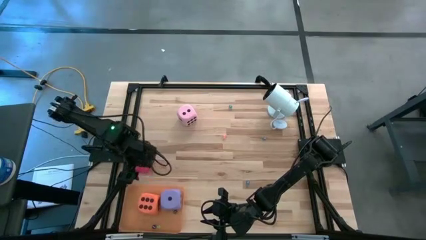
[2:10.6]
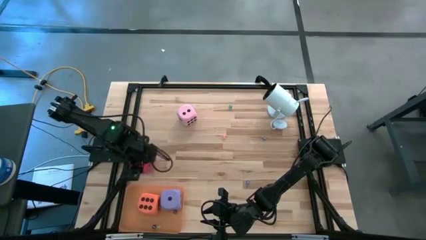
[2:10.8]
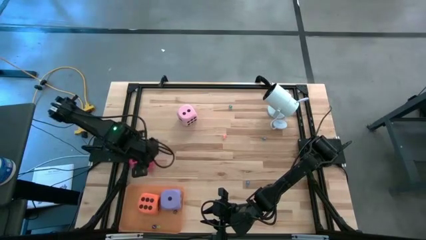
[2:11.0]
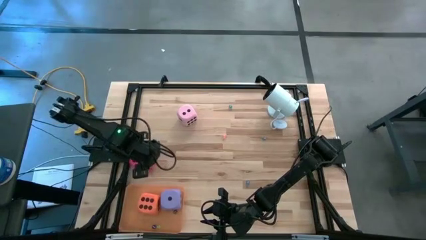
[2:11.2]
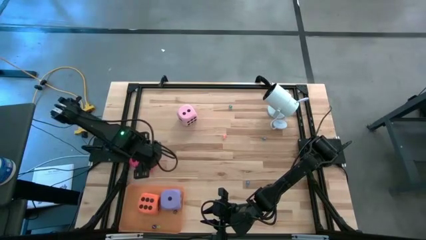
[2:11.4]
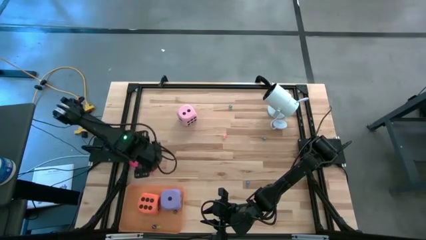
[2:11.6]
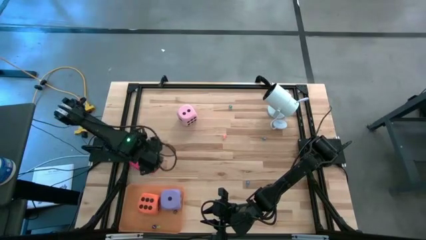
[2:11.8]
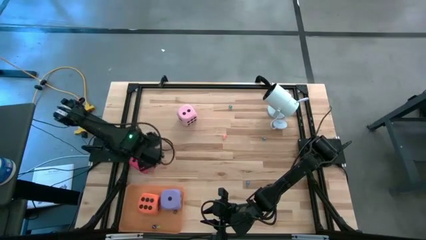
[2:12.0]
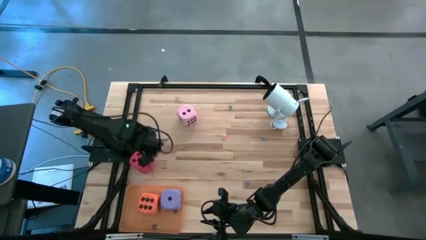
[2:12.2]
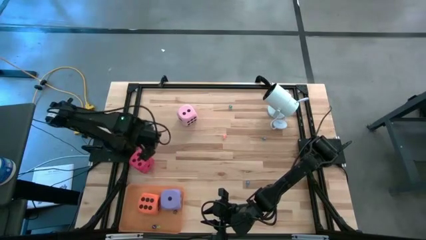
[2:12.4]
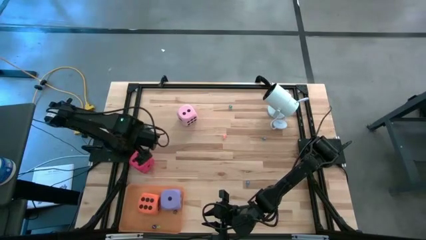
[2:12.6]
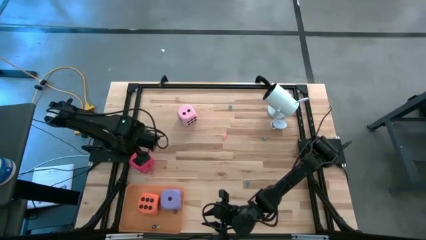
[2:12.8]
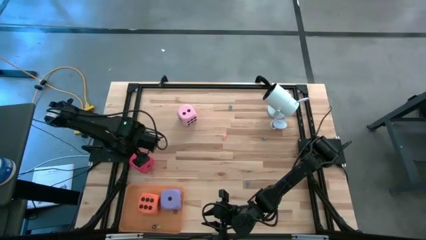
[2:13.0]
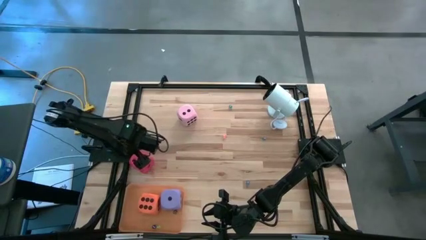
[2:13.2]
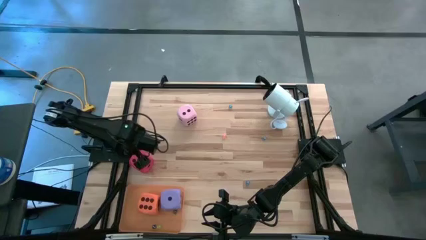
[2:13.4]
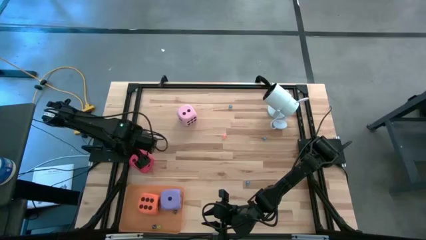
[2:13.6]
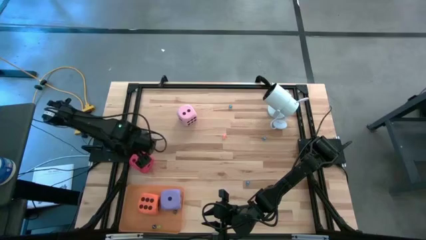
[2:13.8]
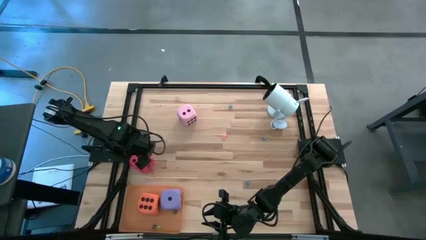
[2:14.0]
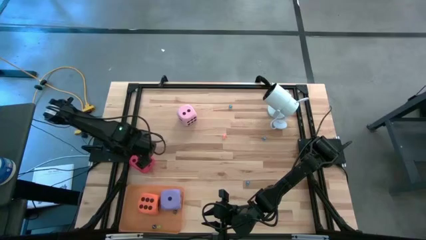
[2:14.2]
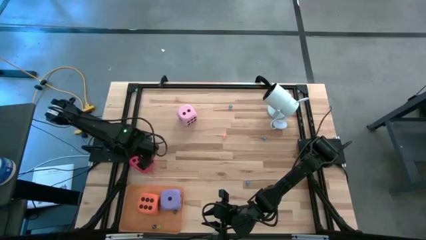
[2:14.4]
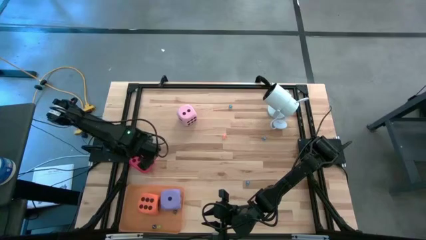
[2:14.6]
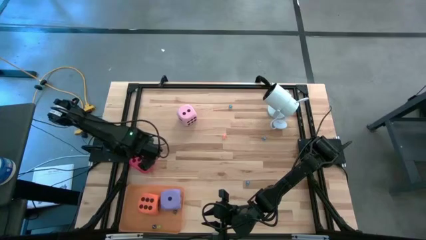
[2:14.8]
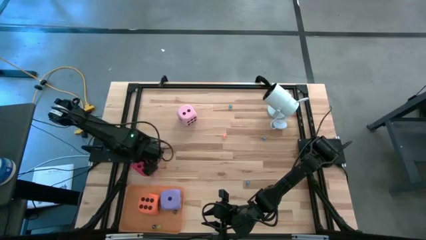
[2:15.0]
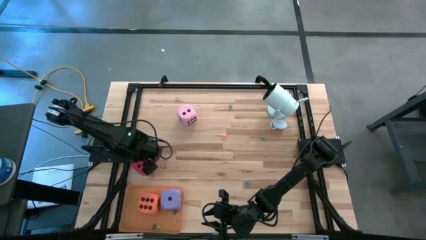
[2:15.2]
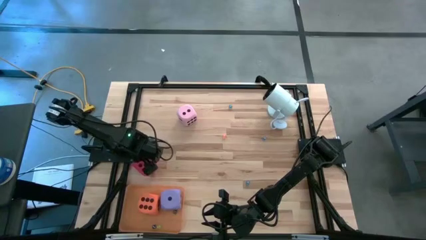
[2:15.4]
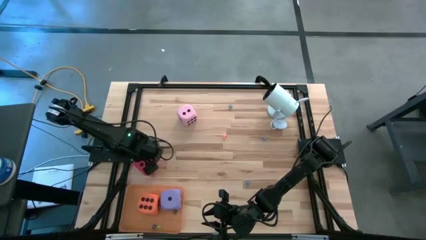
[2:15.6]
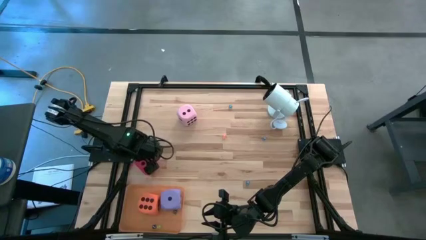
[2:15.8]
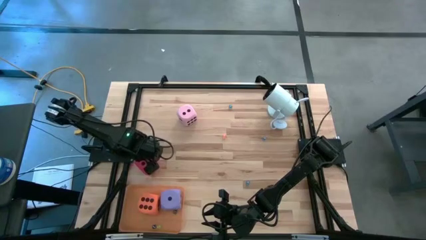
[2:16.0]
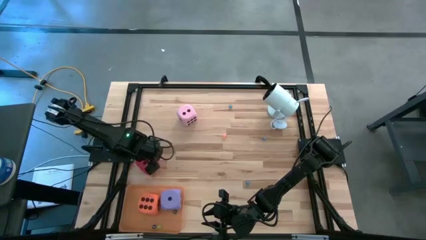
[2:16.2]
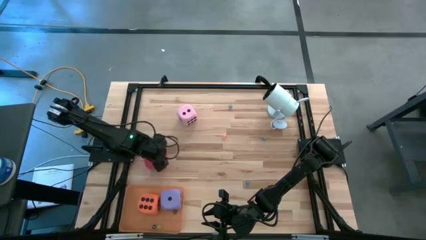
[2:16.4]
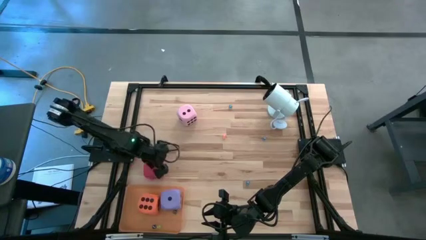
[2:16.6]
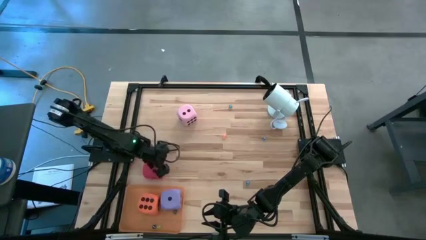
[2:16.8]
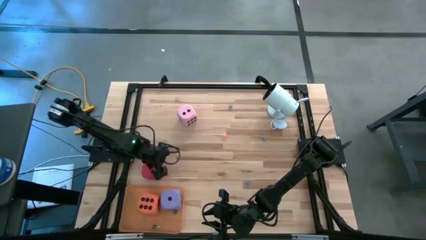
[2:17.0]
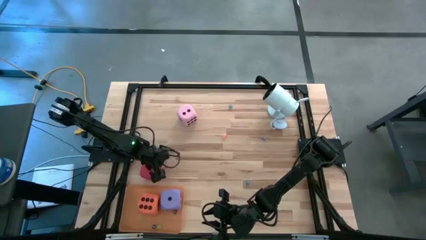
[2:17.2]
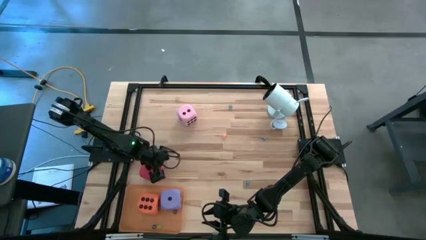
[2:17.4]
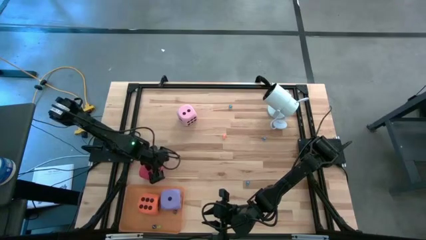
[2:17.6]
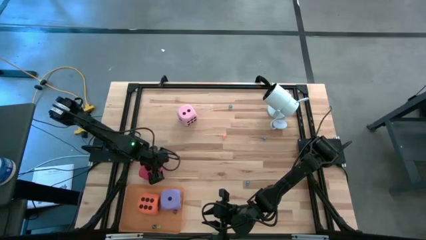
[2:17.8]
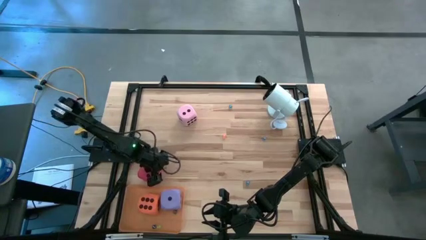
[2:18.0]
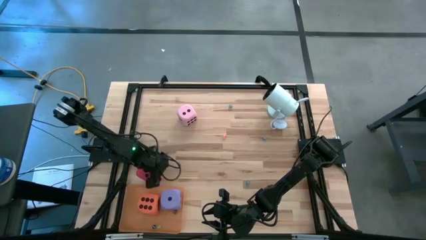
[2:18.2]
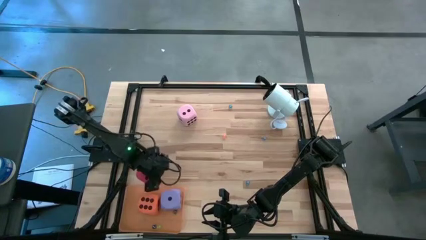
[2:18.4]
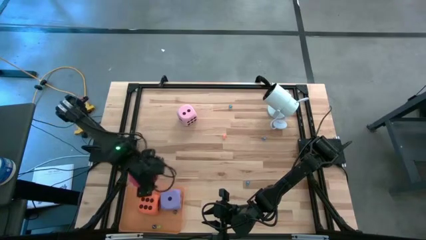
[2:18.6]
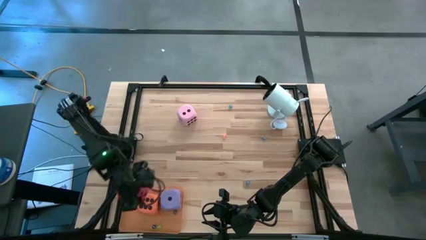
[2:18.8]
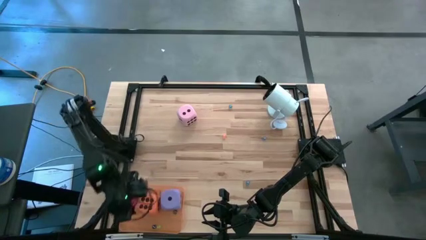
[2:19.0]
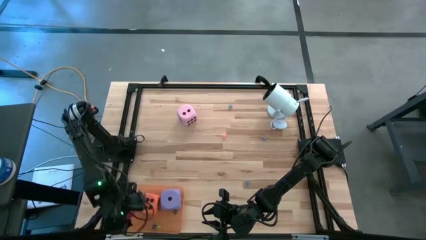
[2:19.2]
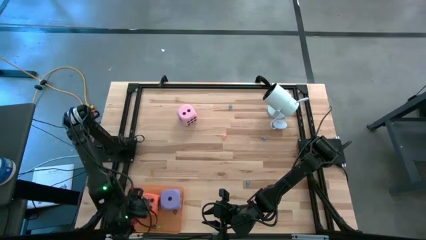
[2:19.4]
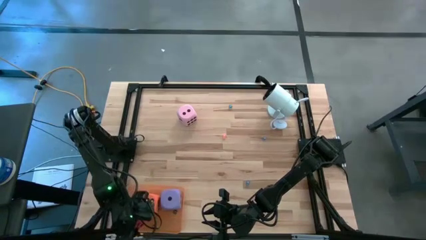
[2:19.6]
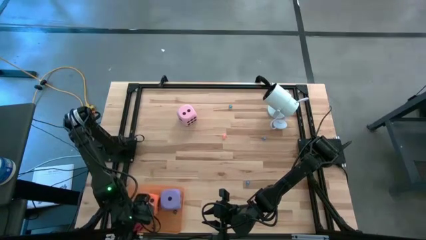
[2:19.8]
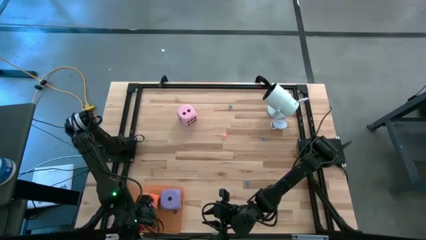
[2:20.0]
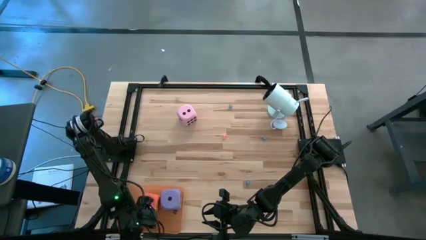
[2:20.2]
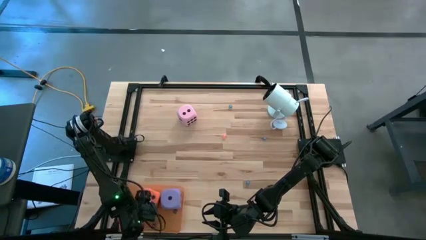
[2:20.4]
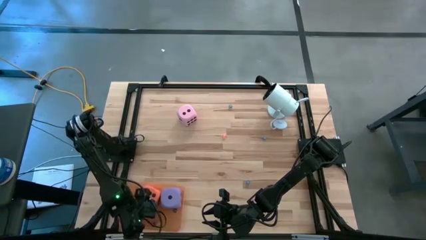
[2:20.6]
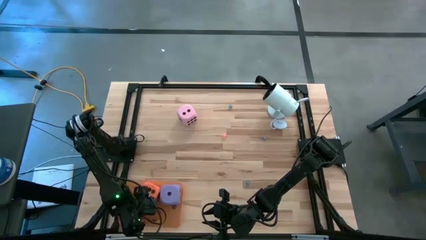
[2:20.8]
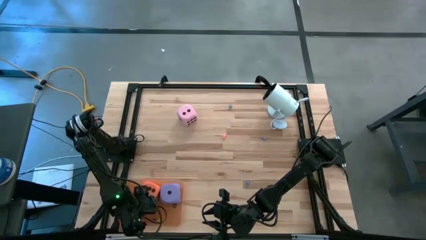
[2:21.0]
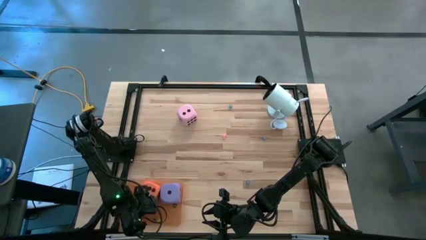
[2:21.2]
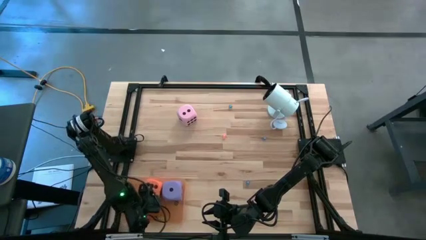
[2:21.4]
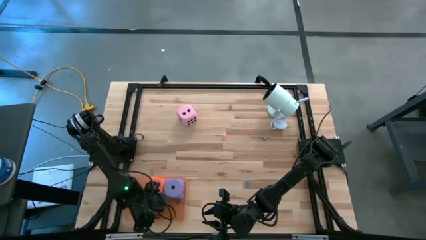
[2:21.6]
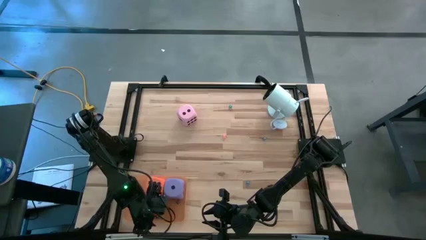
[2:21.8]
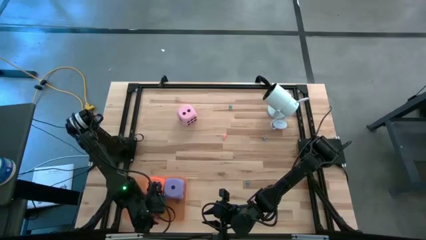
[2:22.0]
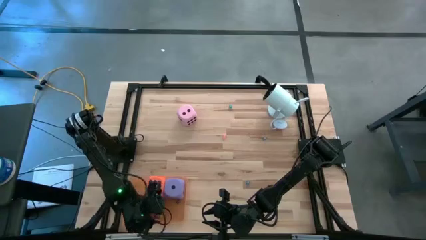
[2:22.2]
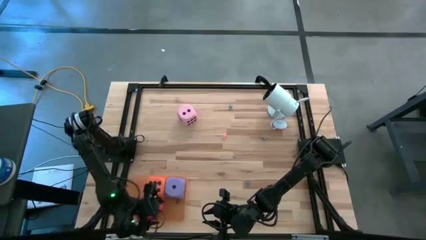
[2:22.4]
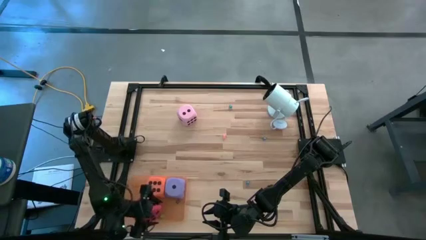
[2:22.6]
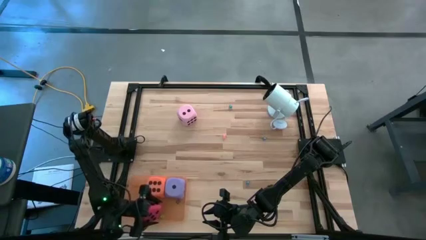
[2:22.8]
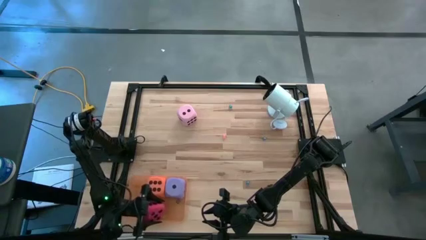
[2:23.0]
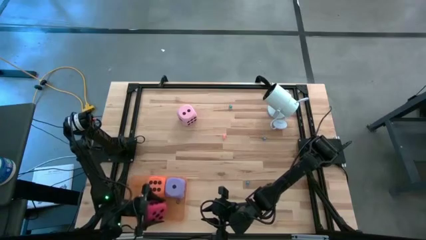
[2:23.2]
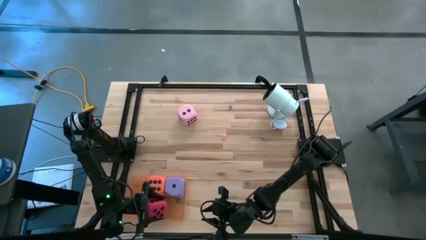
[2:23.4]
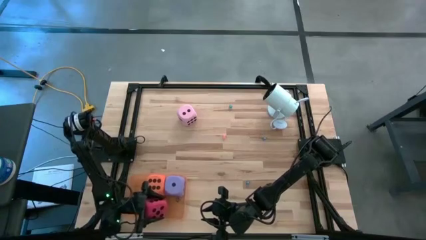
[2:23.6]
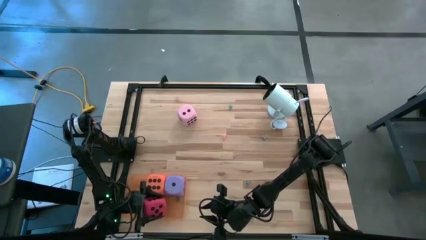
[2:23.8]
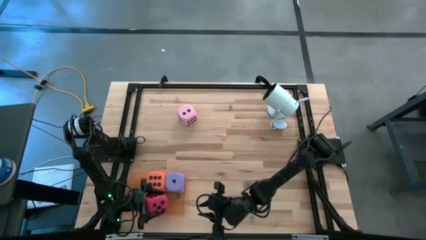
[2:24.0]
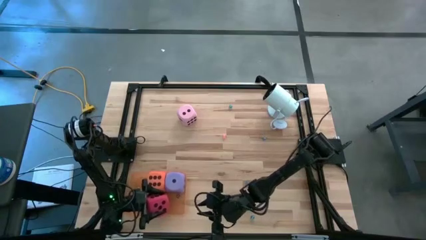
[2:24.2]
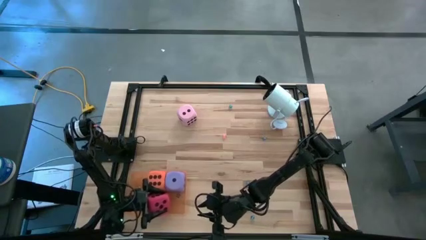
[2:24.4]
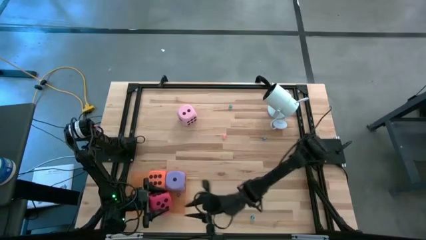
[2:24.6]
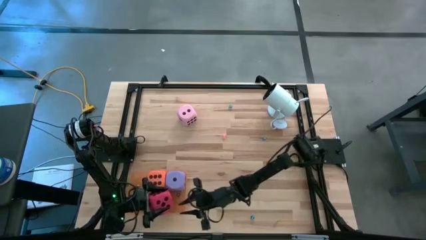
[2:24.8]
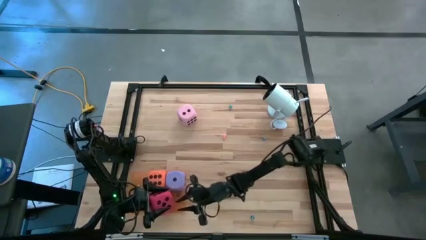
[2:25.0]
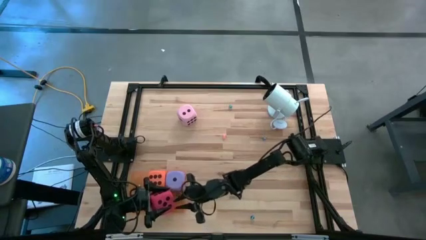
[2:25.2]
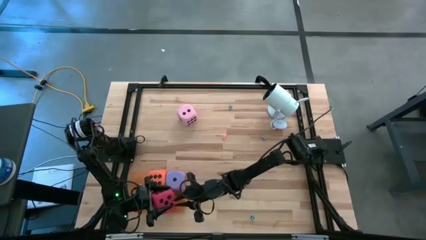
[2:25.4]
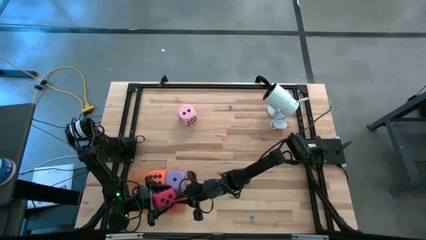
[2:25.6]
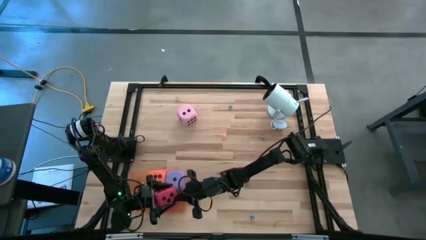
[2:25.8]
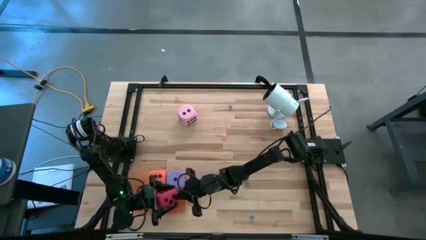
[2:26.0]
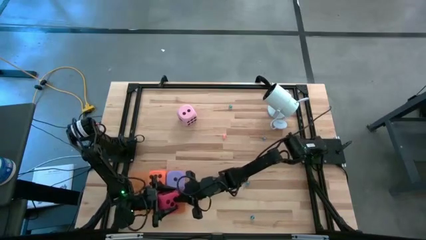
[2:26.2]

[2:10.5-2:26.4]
Task: Pick & Place Dice
Put the large red dice into the orange bin

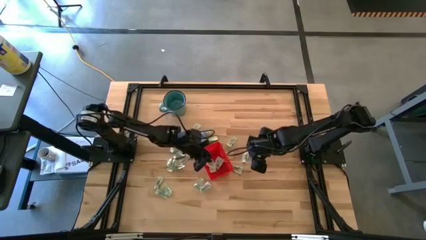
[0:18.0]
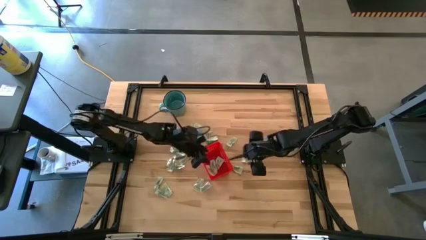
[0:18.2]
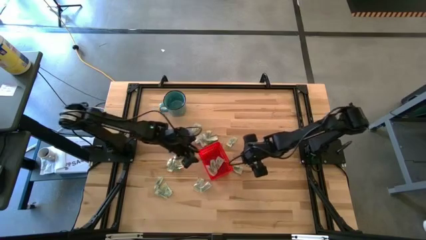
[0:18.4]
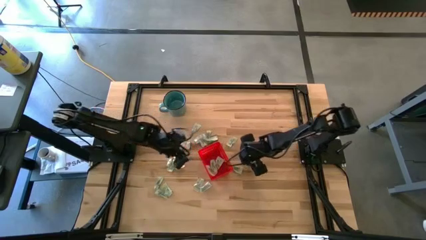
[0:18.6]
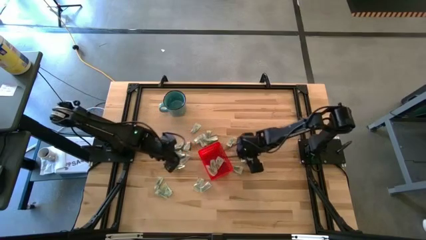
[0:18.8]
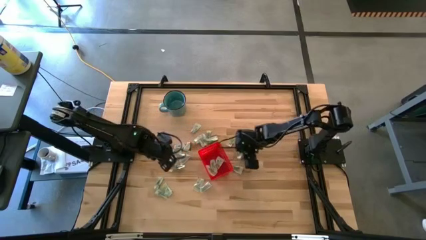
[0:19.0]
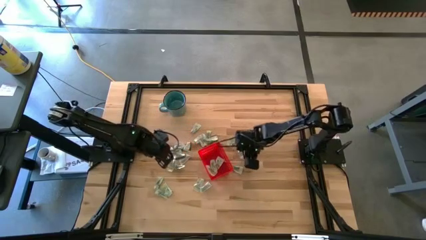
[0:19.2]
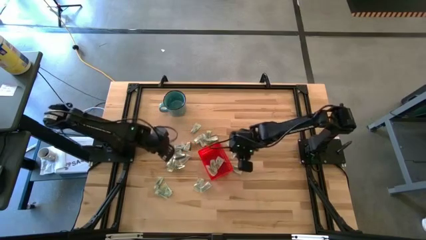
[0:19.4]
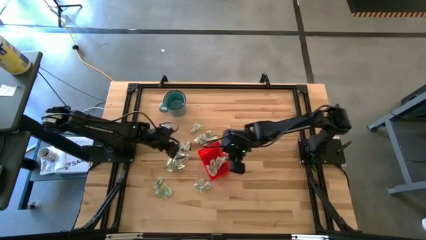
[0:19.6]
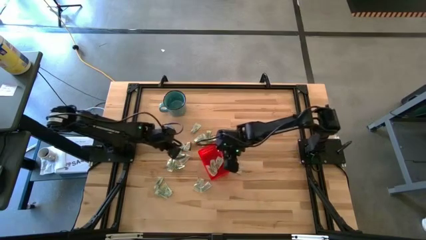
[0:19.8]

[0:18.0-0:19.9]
Task: Pick and place Stevia / Truvia into bins
Put the white stevia packet into the basket
